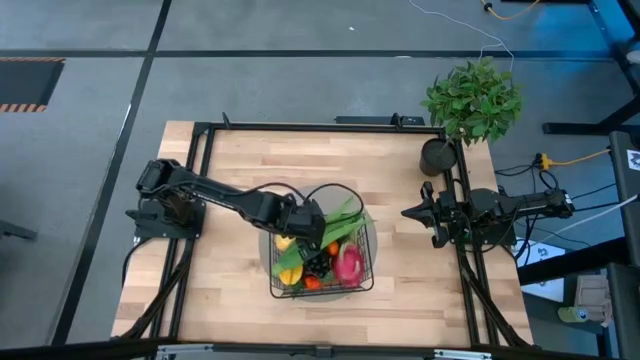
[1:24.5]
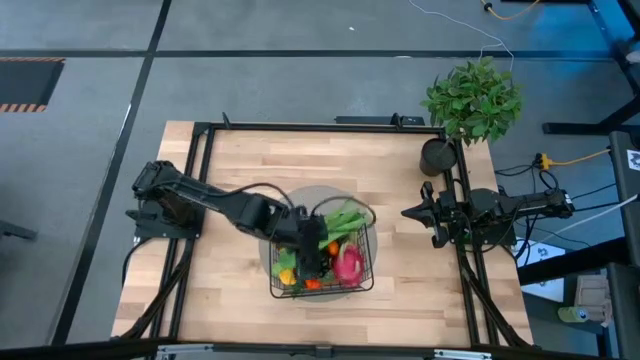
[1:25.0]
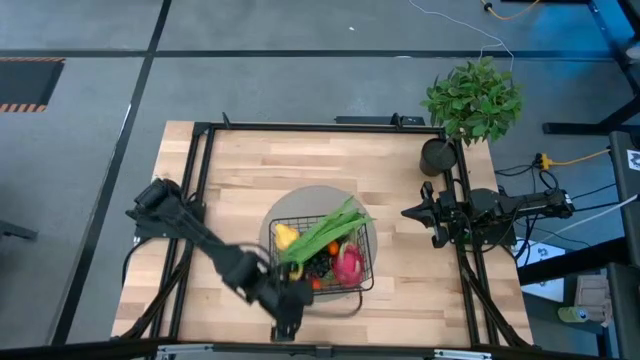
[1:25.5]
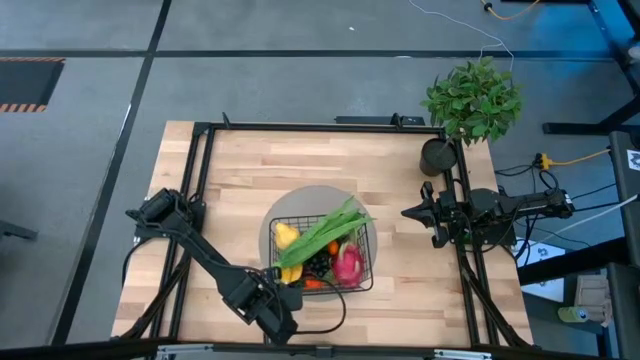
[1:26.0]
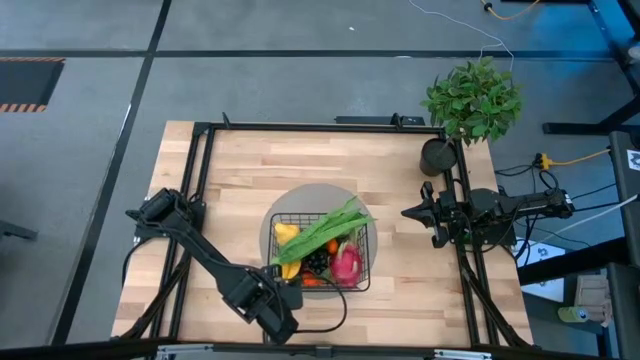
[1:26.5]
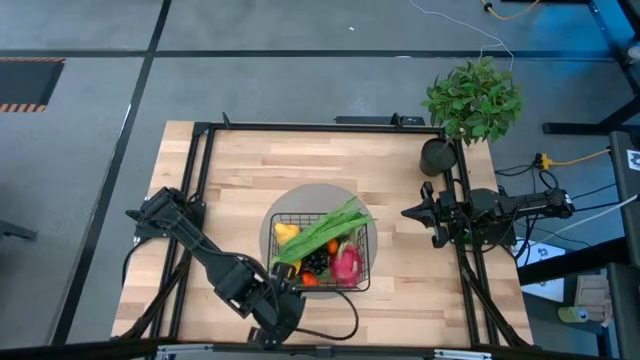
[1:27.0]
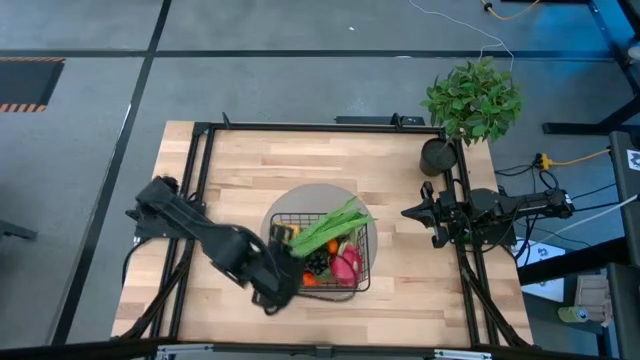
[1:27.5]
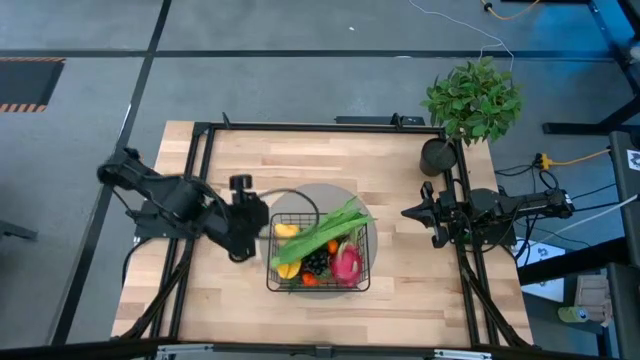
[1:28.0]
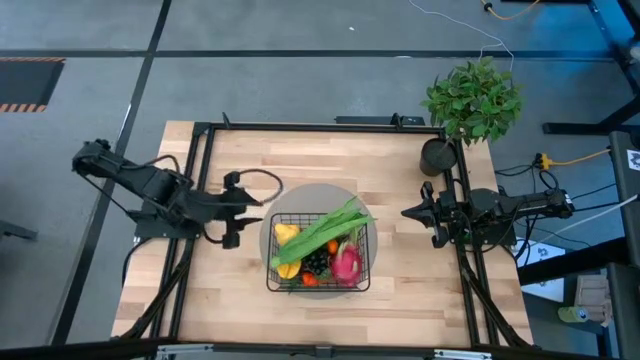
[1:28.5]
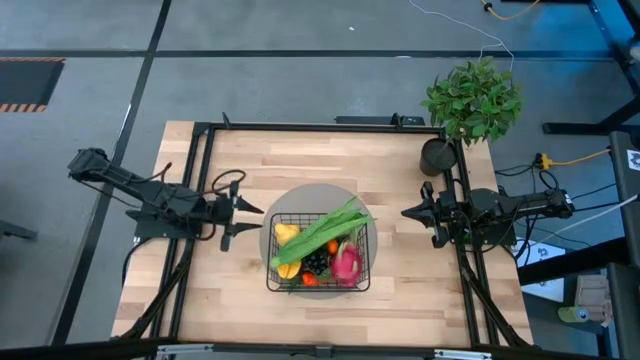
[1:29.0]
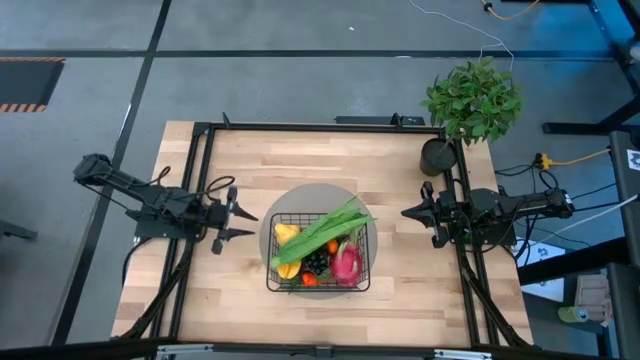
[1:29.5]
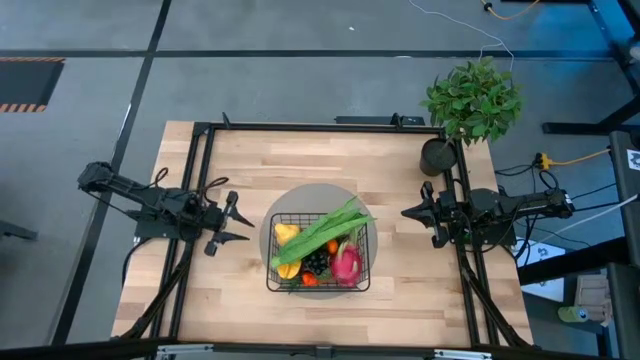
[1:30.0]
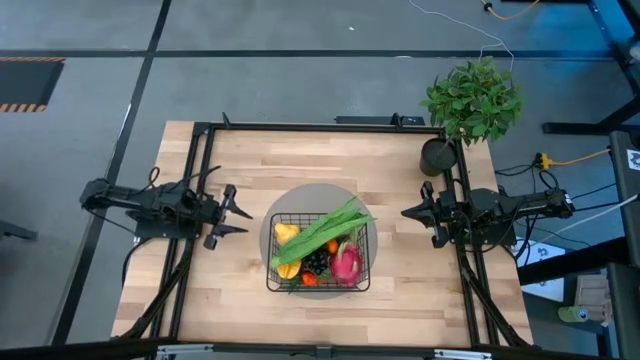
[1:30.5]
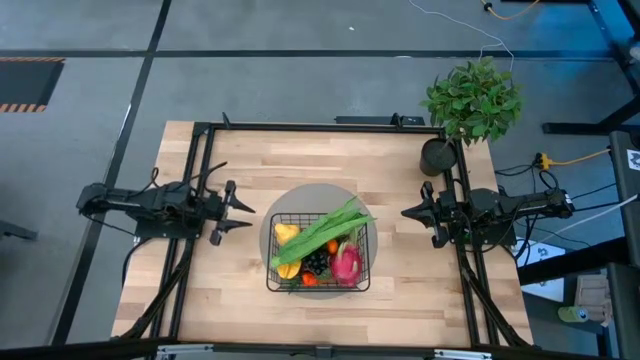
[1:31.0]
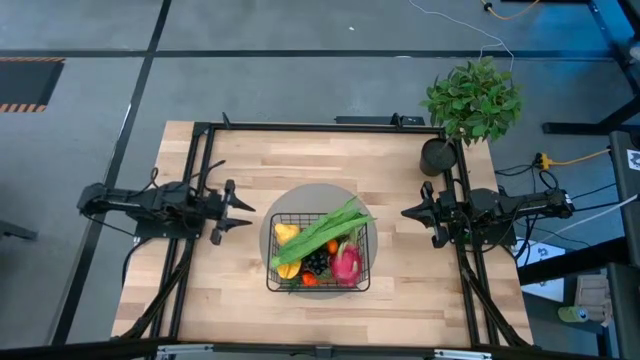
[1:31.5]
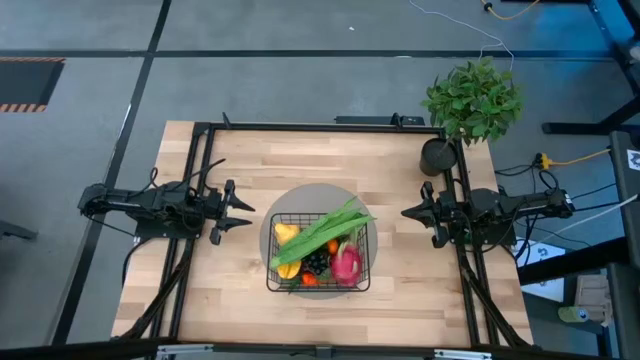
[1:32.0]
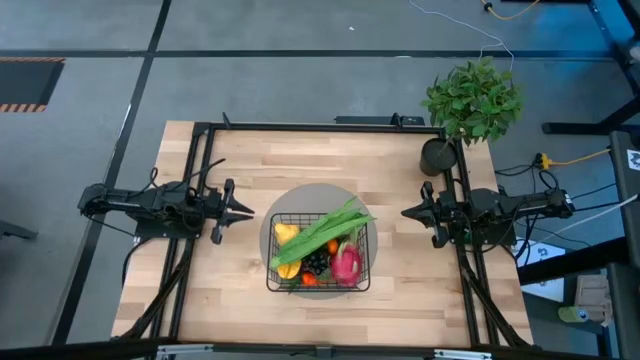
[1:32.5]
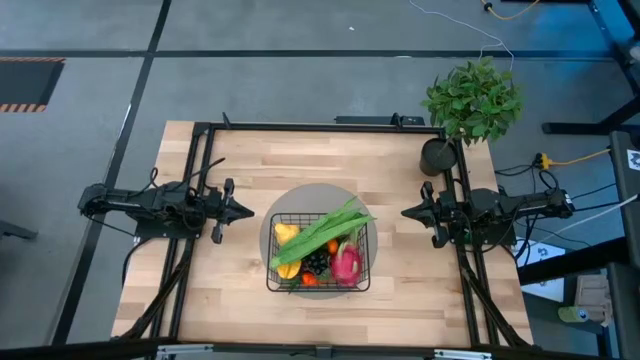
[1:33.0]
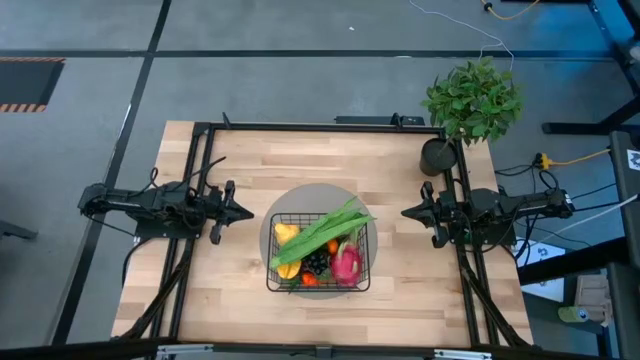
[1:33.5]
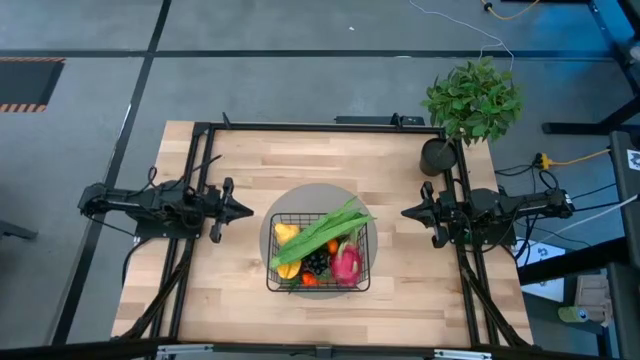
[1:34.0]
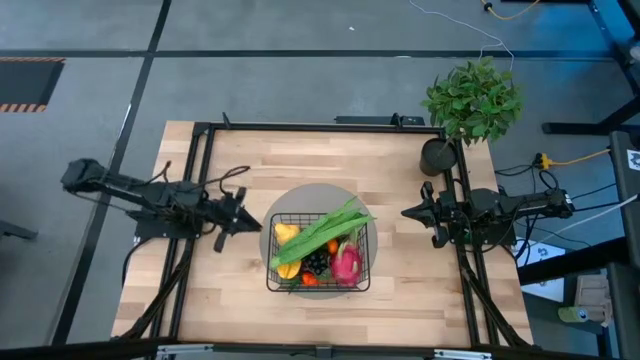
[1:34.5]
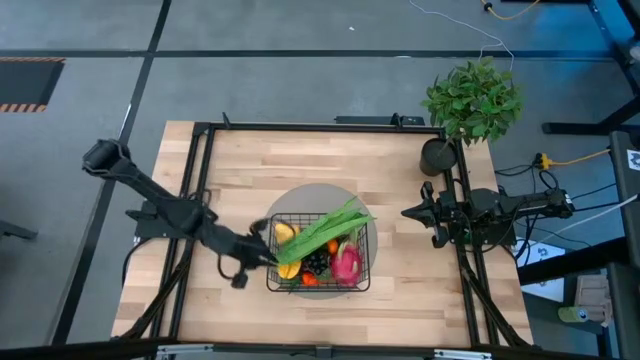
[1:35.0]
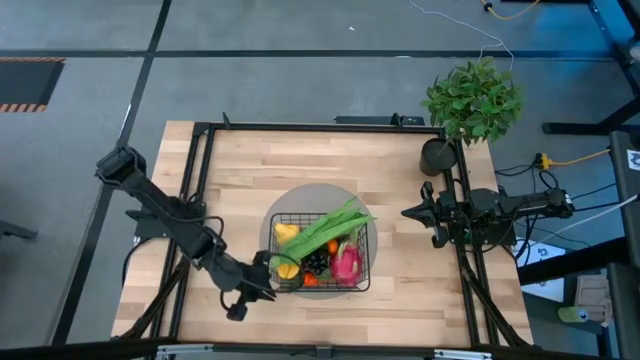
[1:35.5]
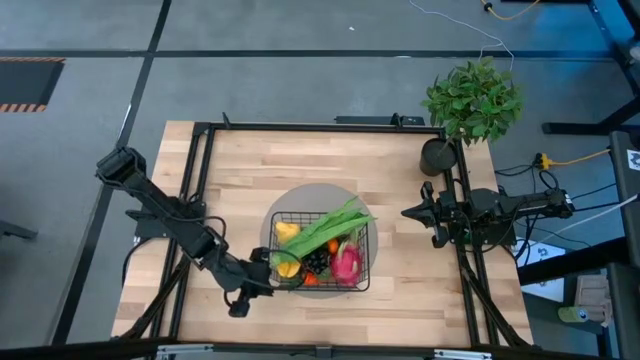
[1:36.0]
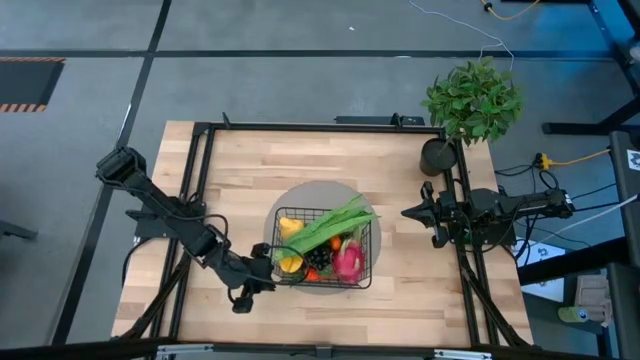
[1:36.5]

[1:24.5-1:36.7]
Task: Build produce basket
Adjust the wire basket

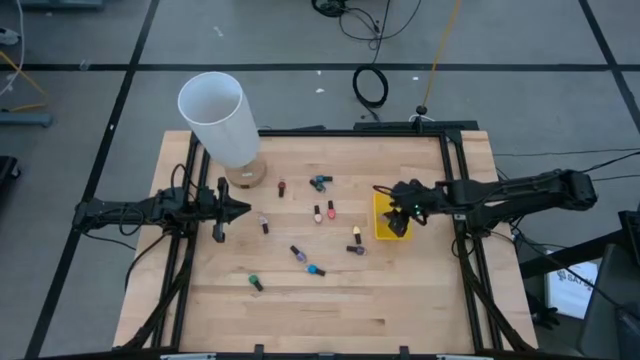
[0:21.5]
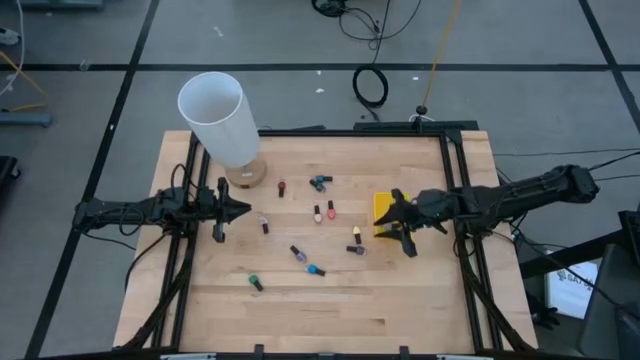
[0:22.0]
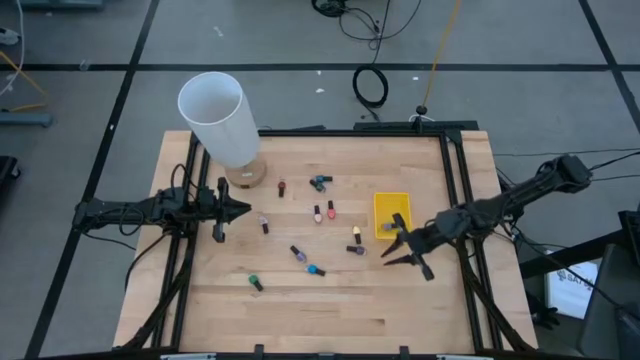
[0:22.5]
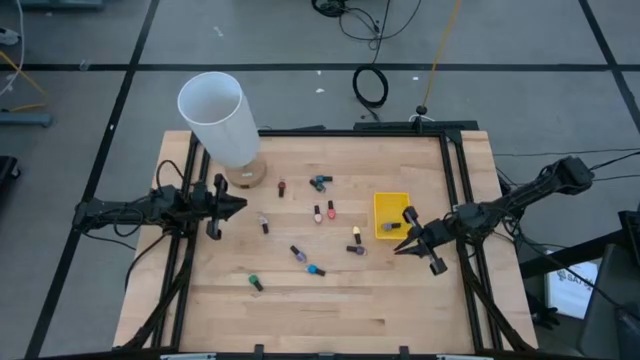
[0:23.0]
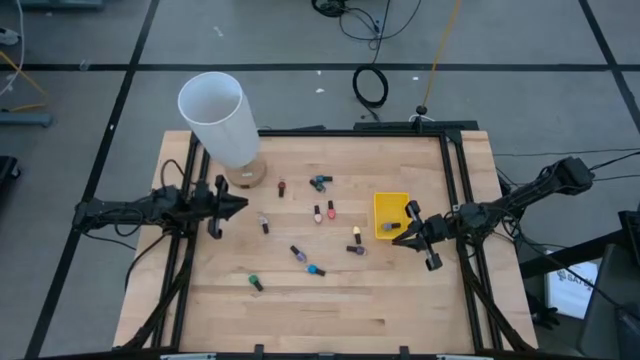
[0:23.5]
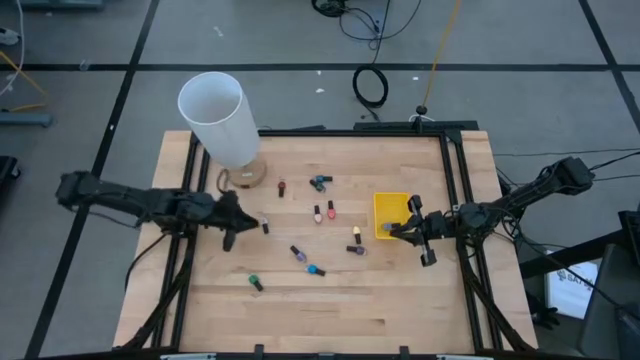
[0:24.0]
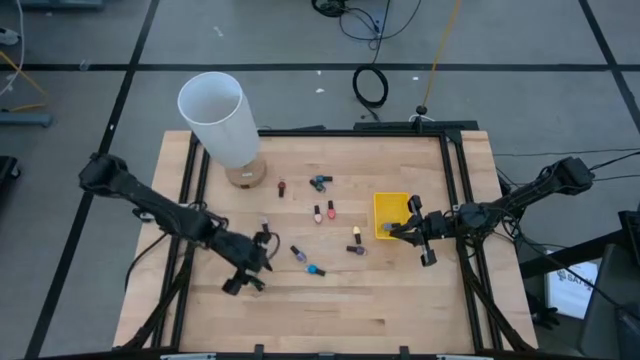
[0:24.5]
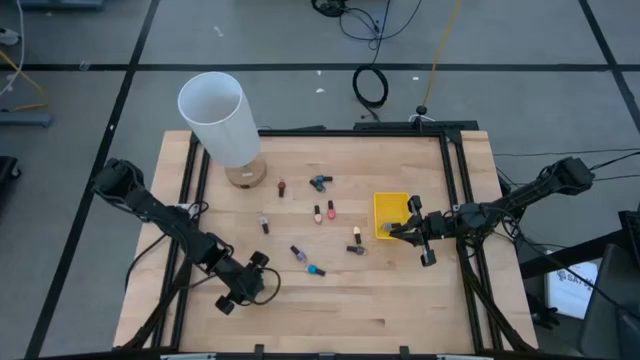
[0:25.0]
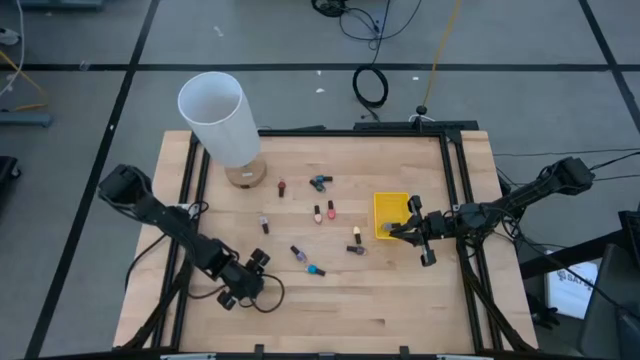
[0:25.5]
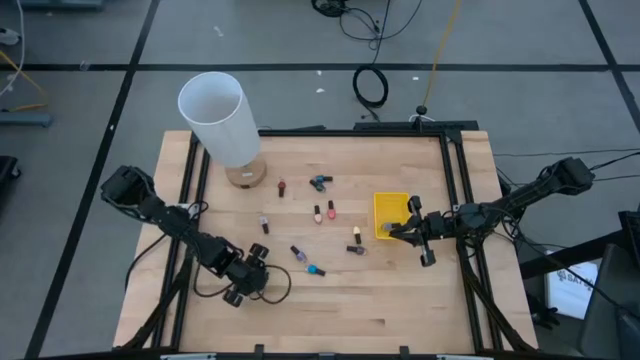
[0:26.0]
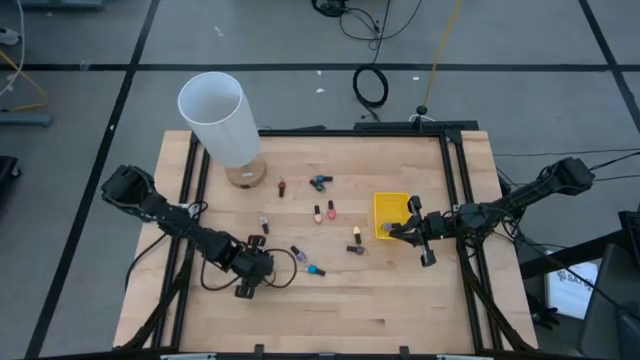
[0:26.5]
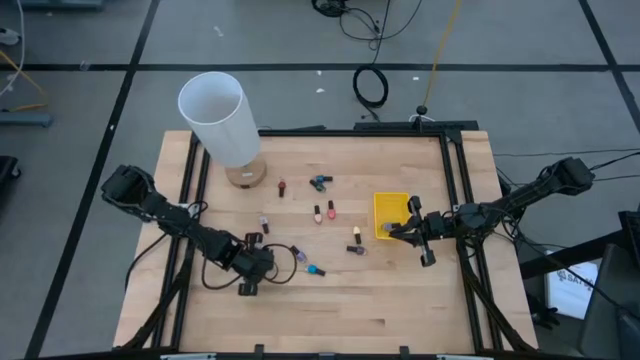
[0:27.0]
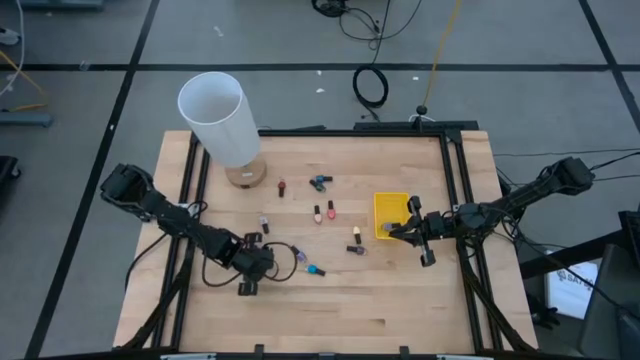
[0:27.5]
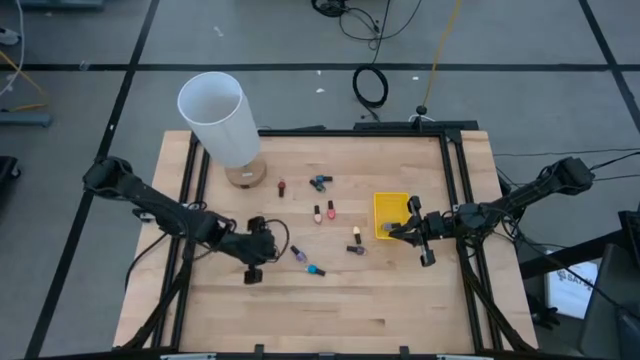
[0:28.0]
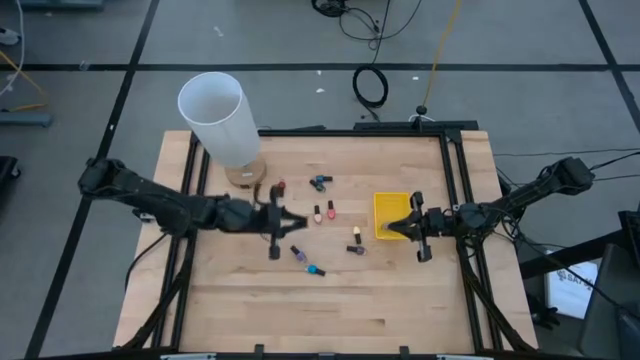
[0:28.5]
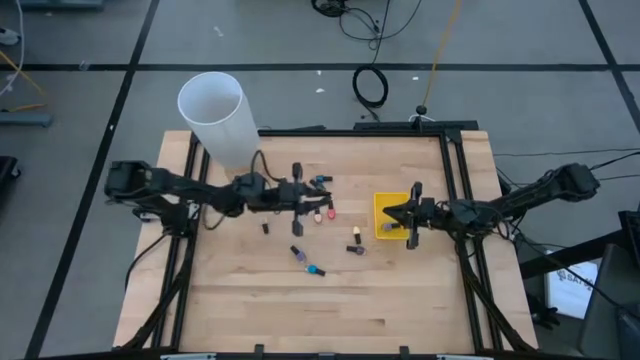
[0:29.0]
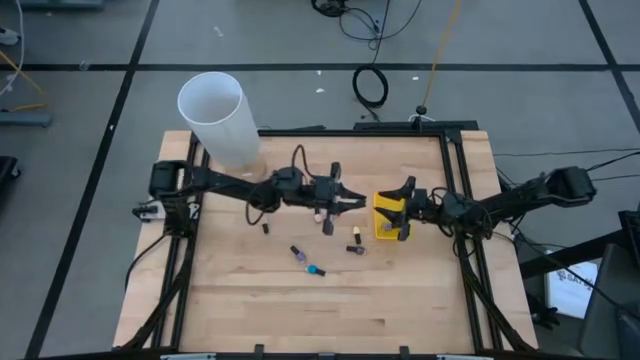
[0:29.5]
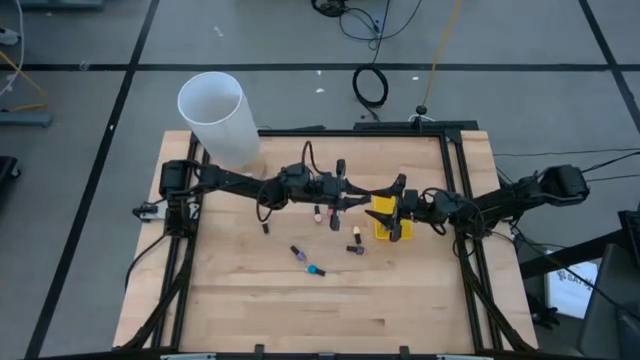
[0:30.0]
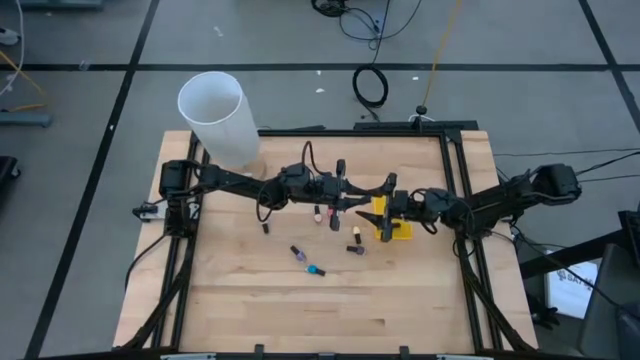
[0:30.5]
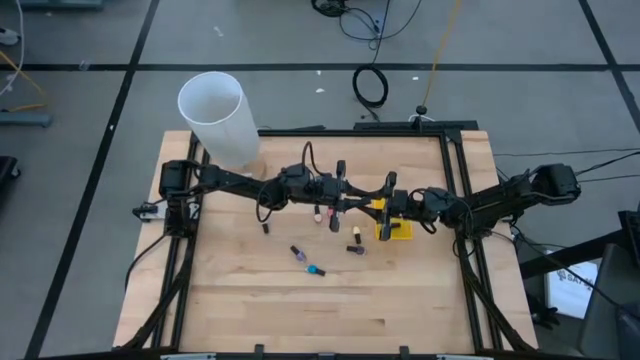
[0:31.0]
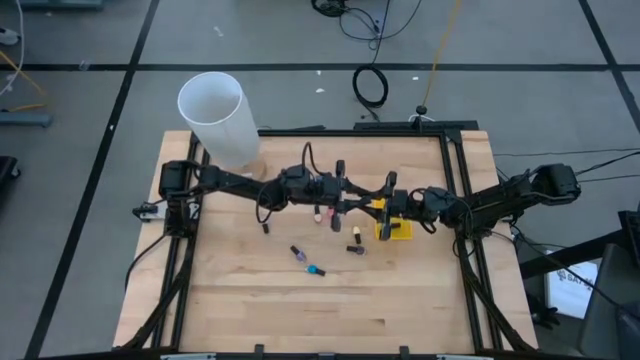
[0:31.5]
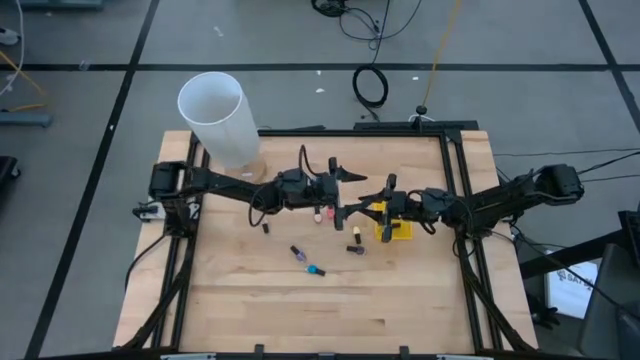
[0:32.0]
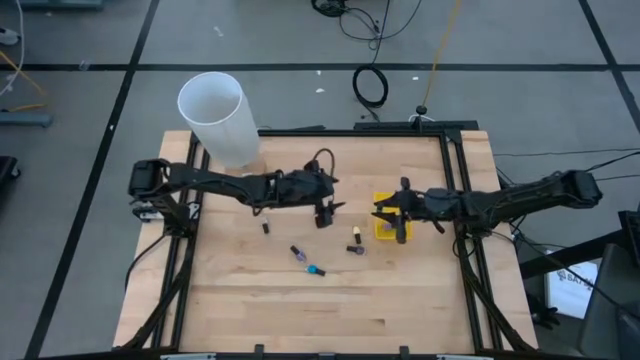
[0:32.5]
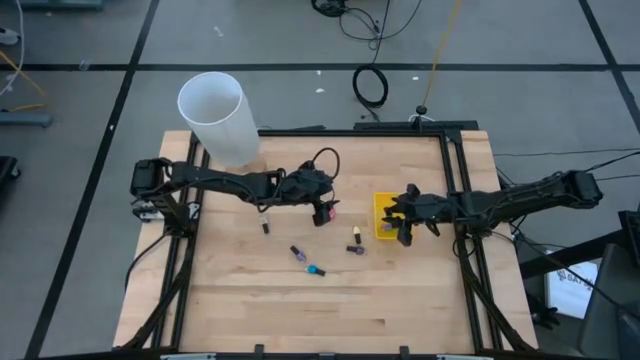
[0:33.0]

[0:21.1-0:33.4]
Task: Pick & Place Nail Polish
Put the green nail polish into the yellow bin
